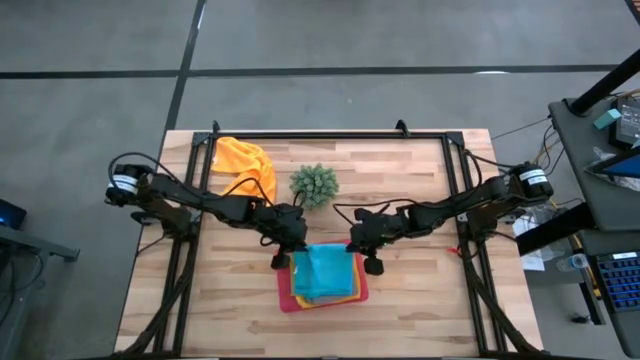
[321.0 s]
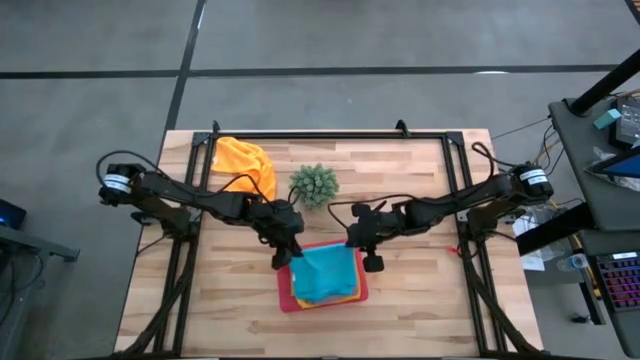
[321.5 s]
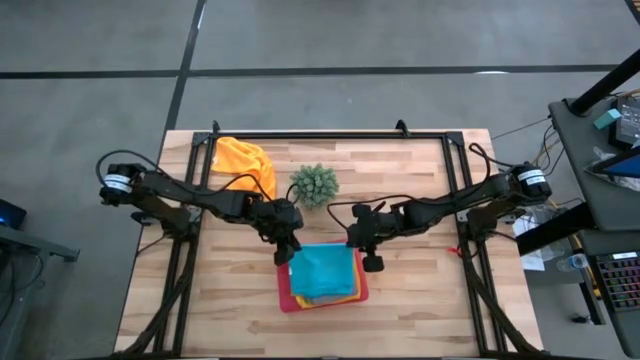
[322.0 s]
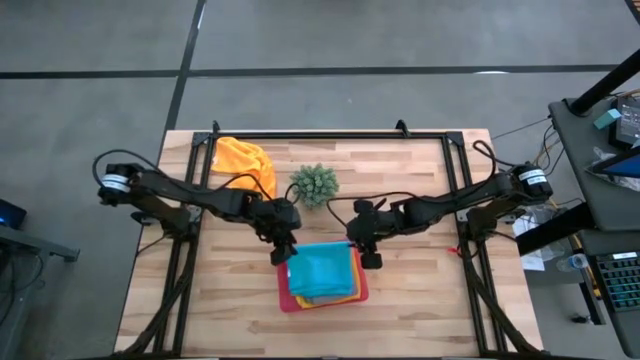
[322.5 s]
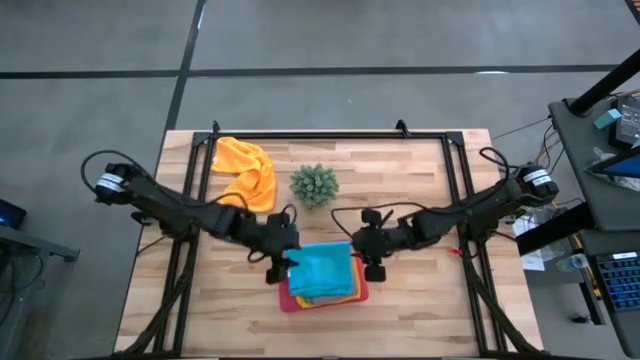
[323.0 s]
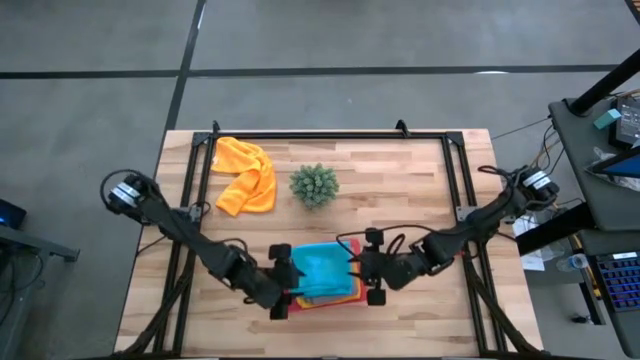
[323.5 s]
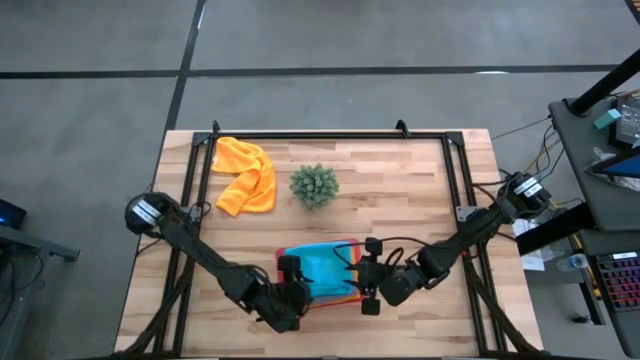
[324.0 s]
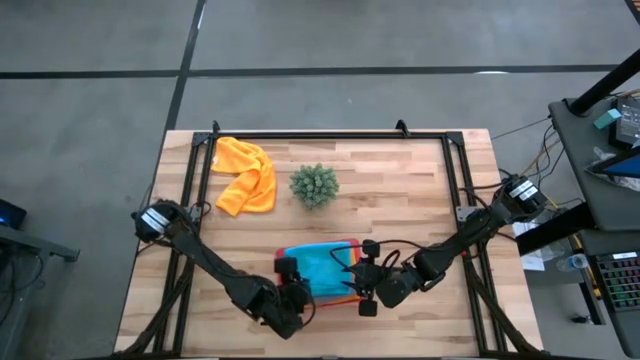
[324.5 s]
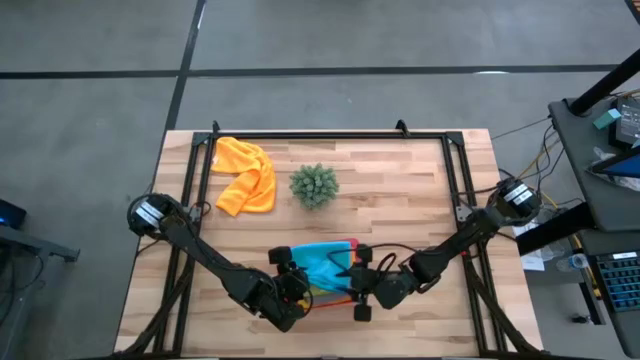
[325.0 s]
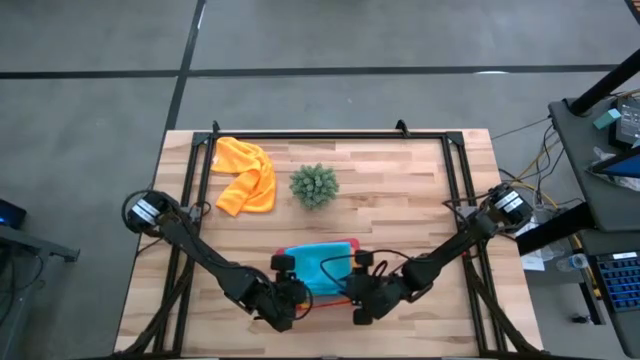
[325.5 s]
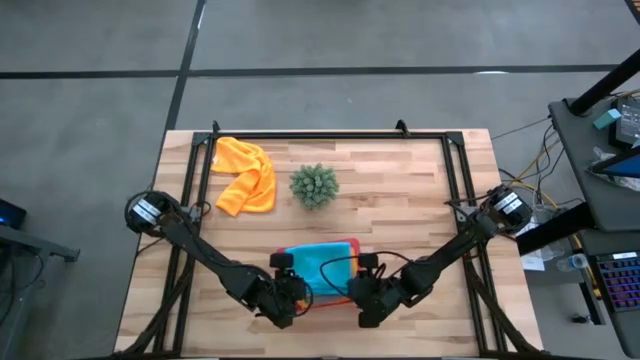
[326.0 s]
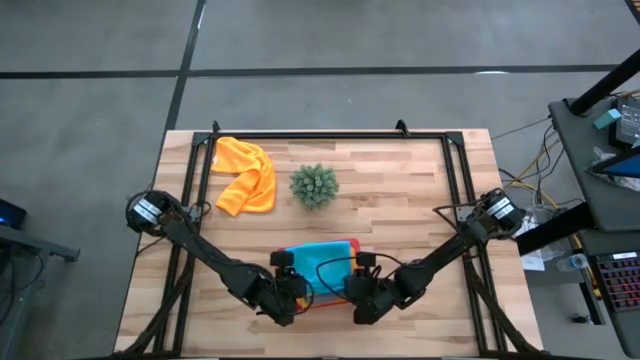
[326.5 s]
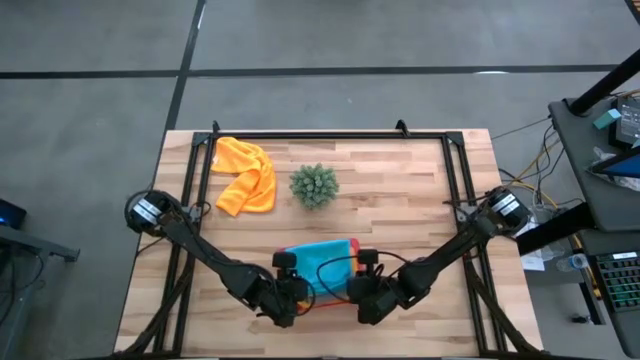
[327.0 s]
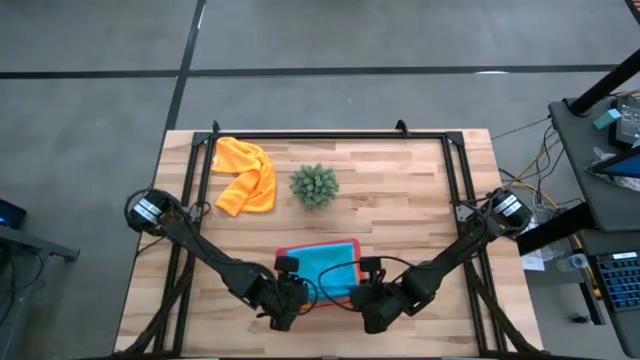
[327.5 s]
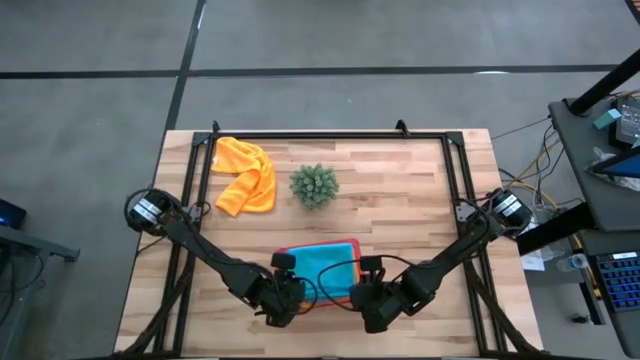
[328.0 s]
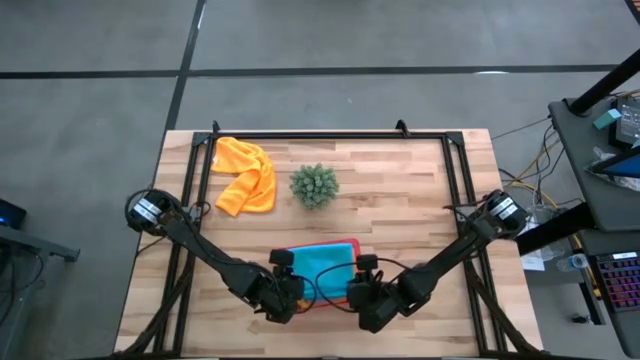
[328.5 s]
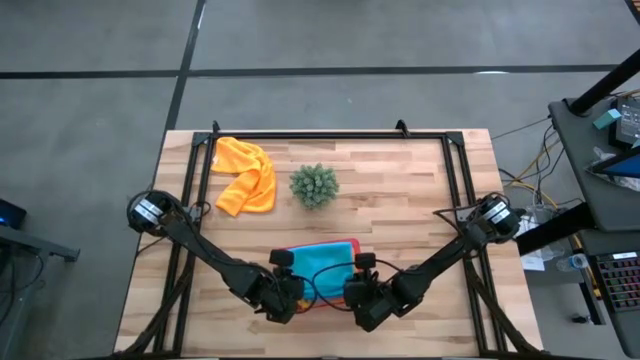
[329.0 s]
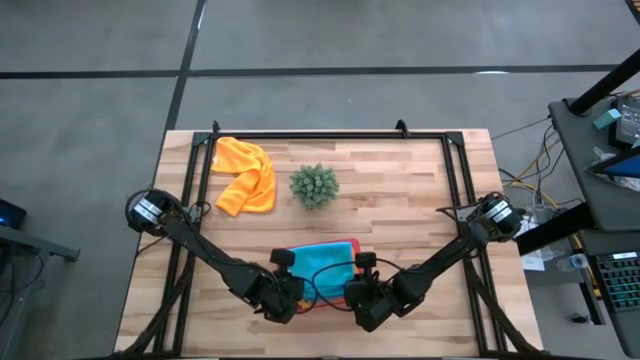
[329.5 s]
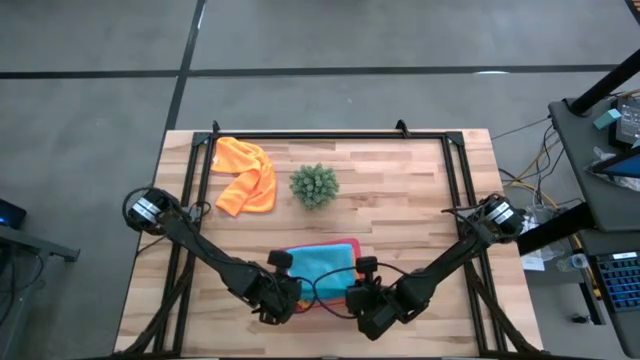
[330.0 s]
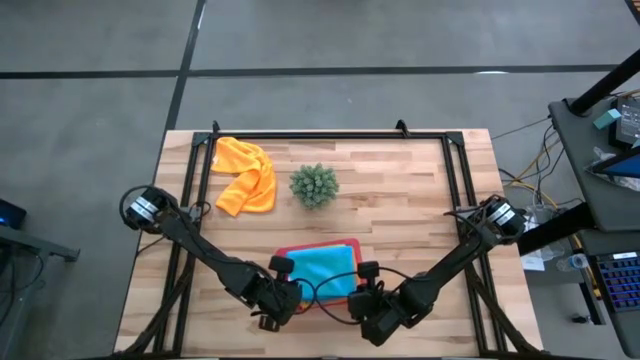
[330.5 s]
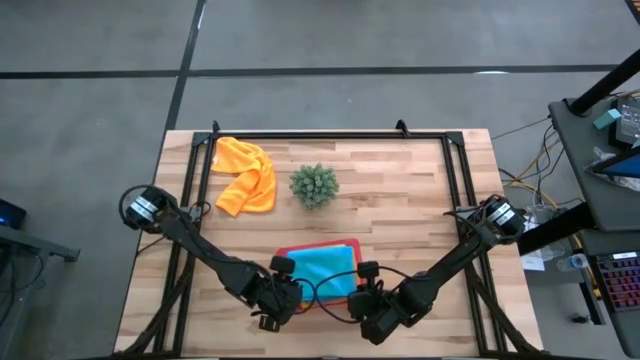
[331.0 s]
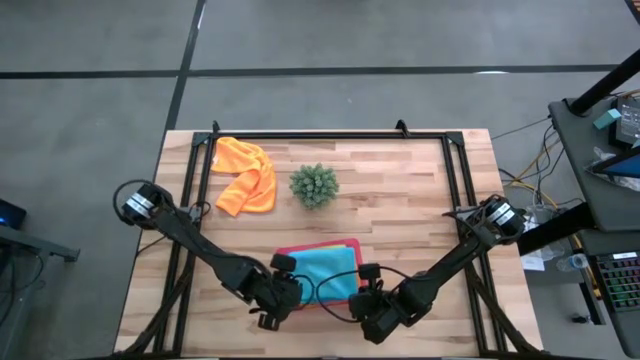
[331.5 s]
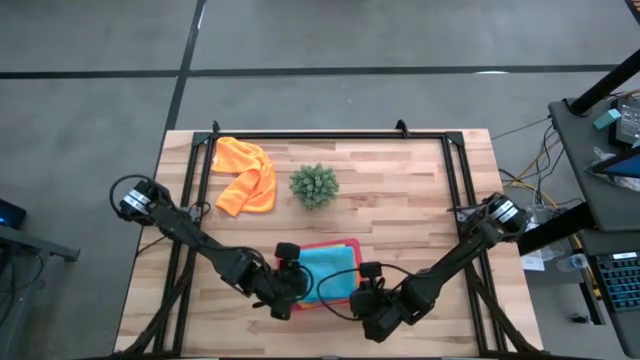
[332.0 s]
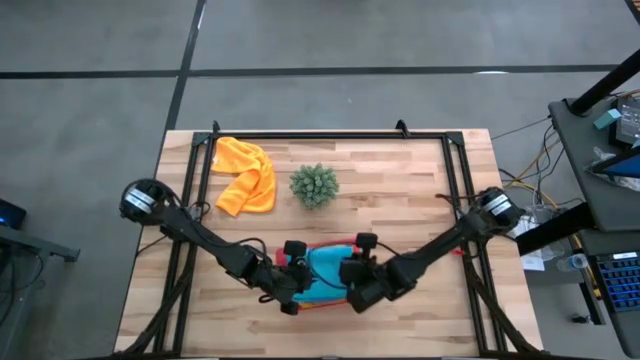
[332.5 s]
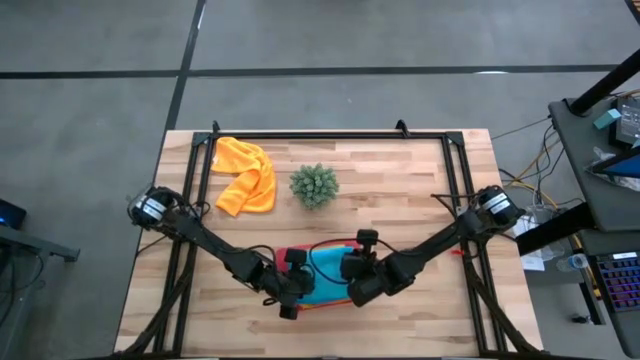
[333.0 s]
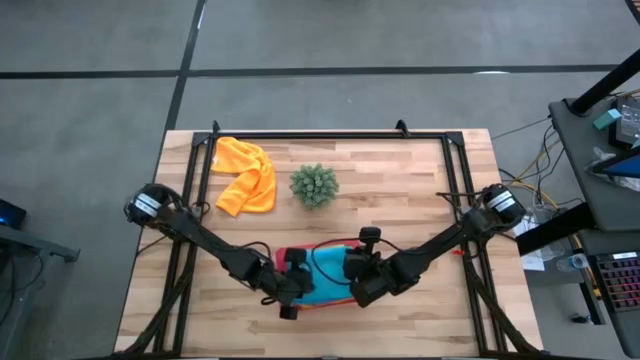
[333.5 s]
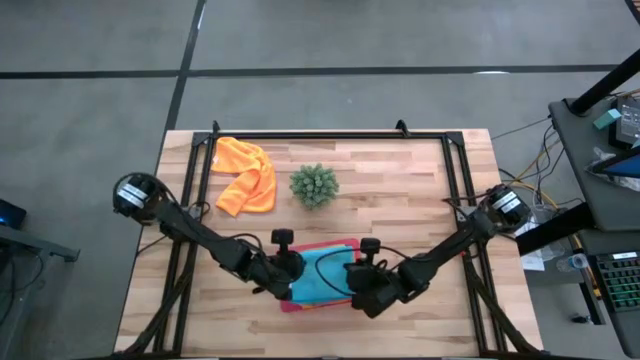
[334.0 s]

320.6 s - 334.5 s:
Task: Fold microfiber towels
Put the blue microfiber cloth into the pink bin

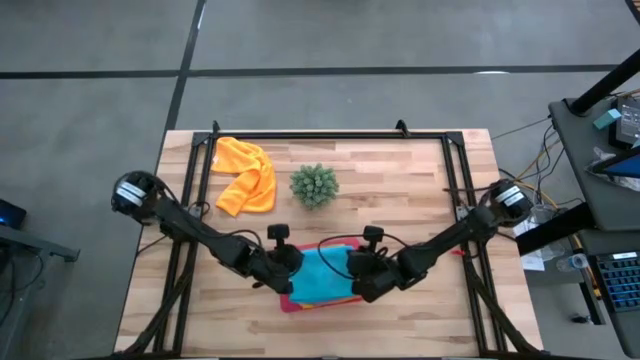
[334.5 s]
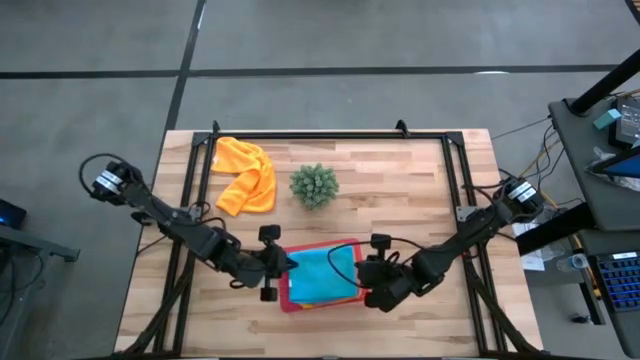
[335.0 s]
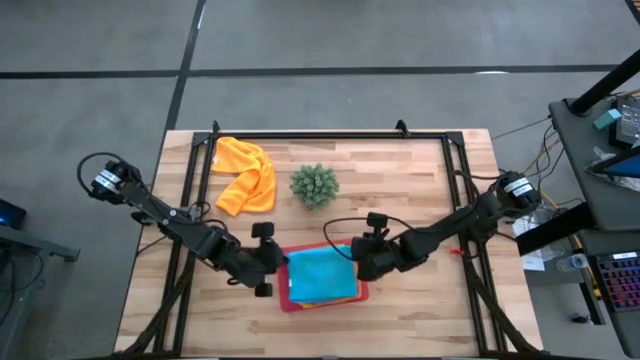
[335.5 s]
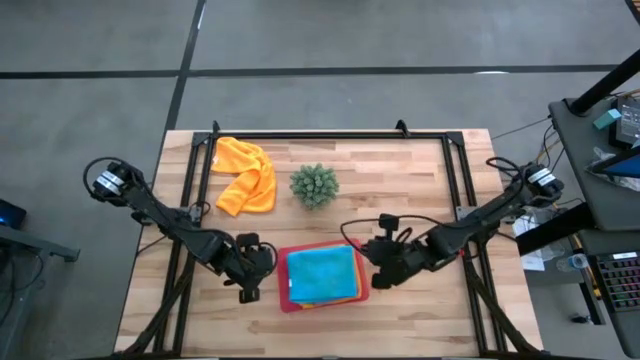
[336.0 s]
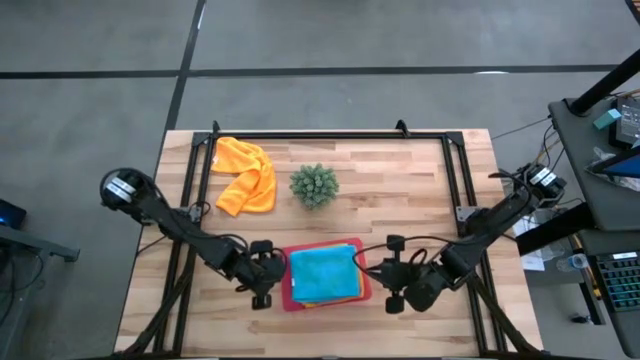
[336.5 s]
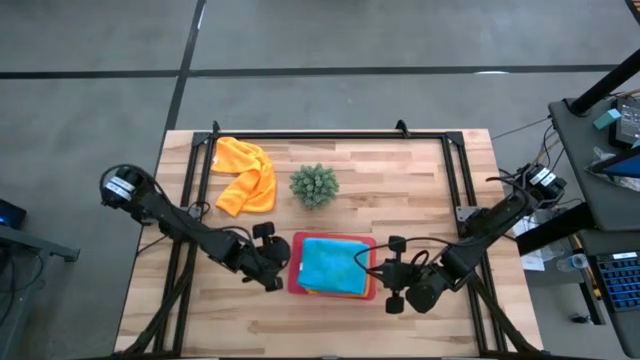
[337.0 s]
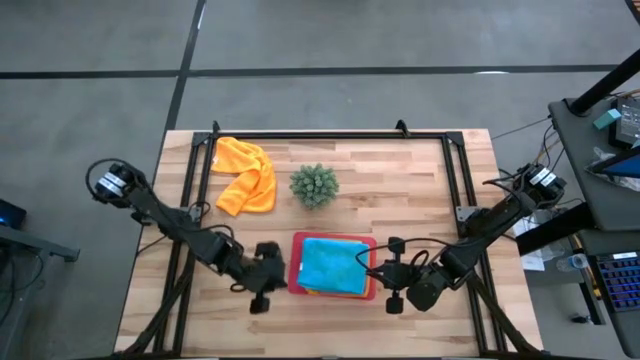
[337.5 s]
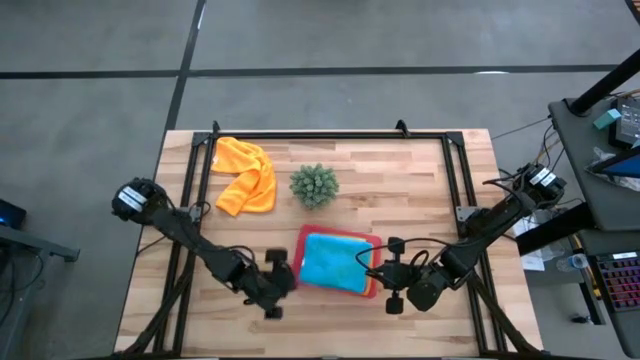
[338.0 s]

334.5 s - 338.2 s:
Adjust the pink bin

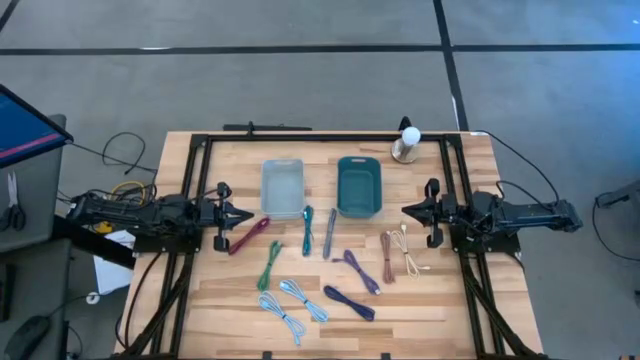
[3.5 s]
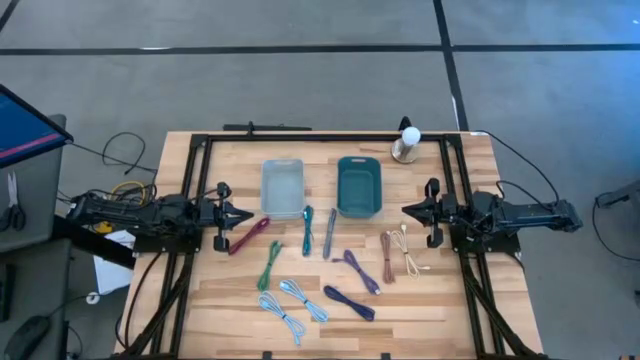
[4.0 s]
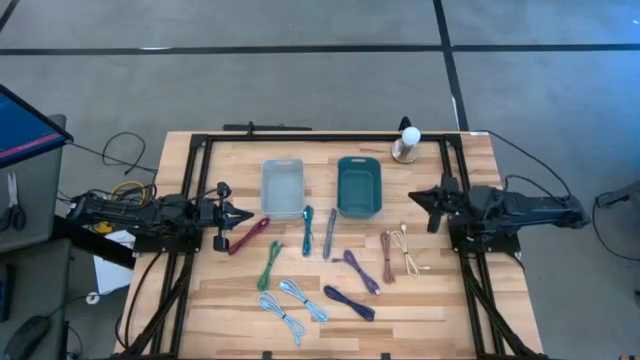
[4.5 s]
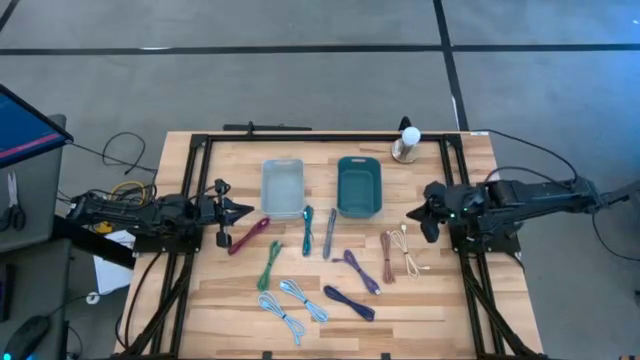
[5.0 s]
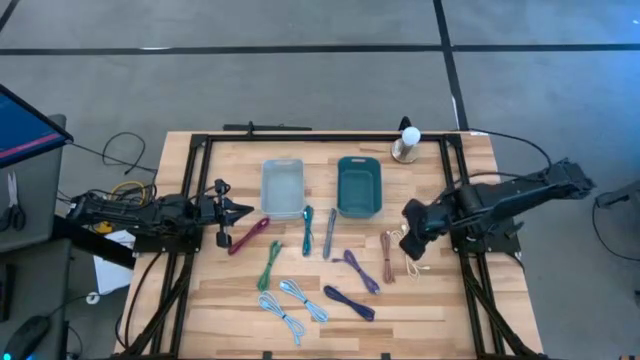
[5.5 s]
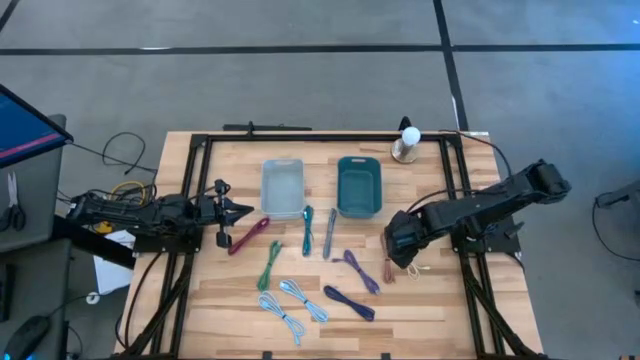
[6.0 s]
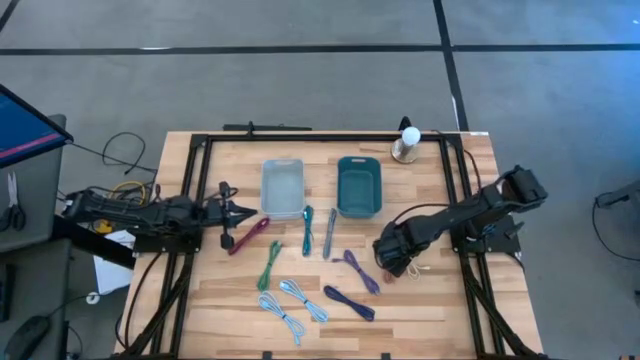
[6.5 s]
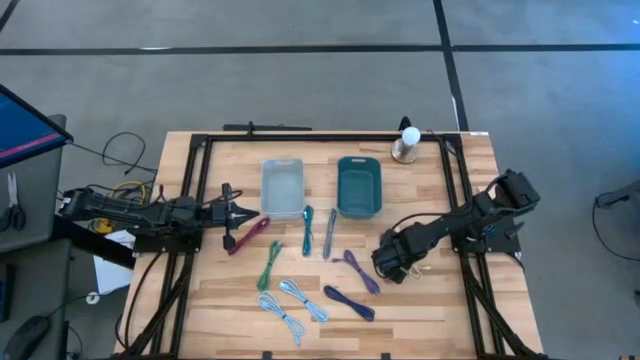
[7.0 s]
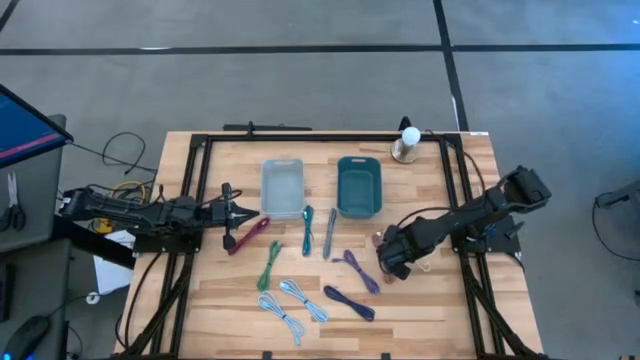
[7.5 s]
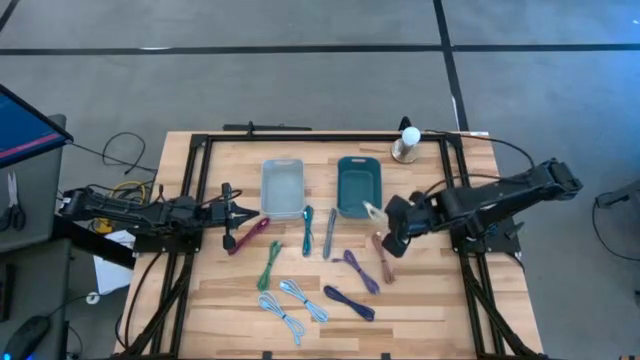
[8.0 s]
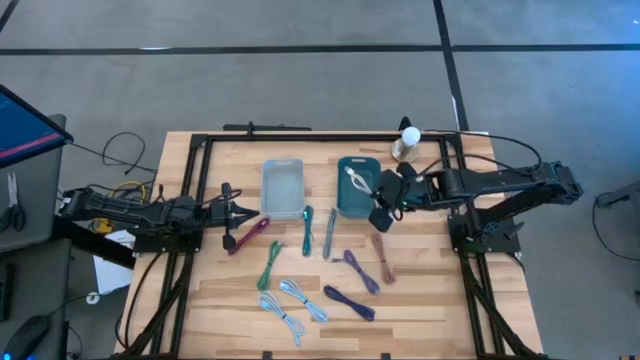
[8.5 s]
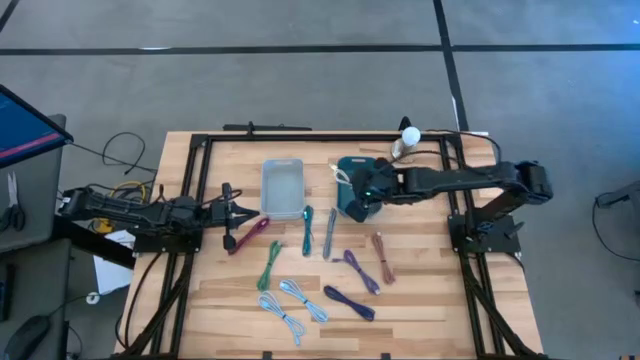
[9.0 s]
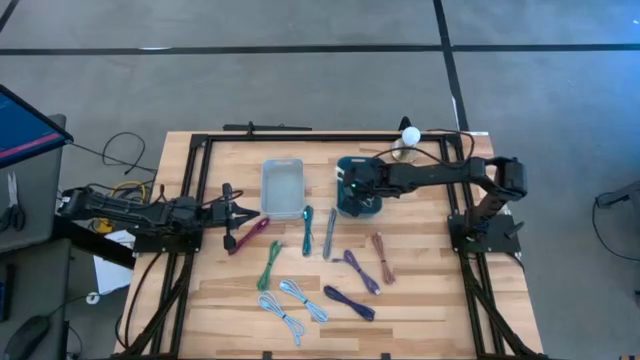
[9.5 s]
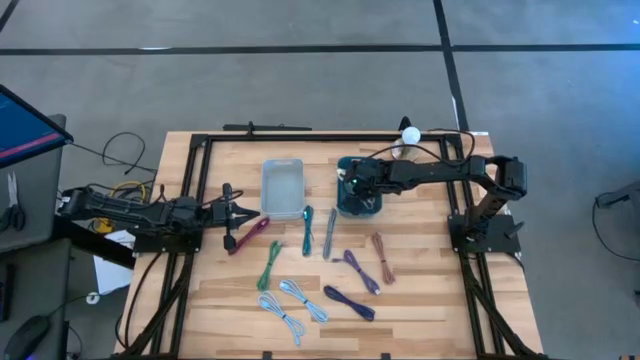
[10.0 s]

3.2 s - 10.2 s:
Task: Pick & Place USB Port
Put the white charger cable into the blue bin
